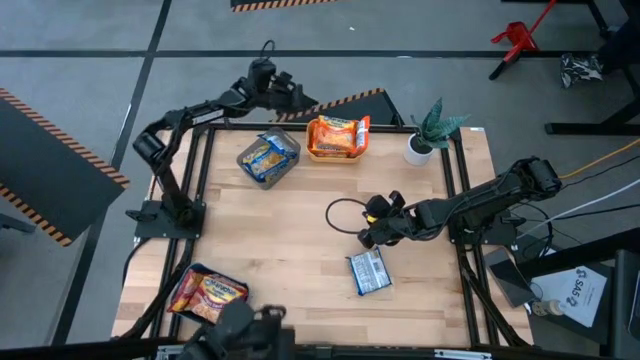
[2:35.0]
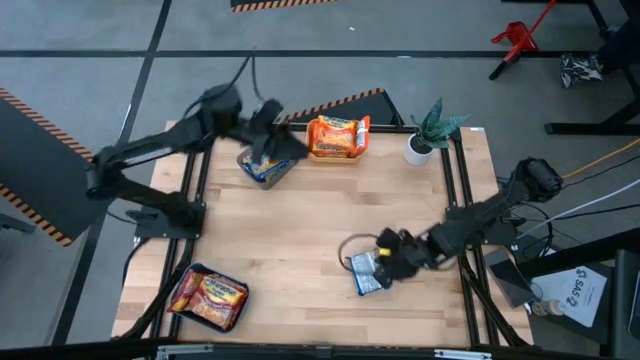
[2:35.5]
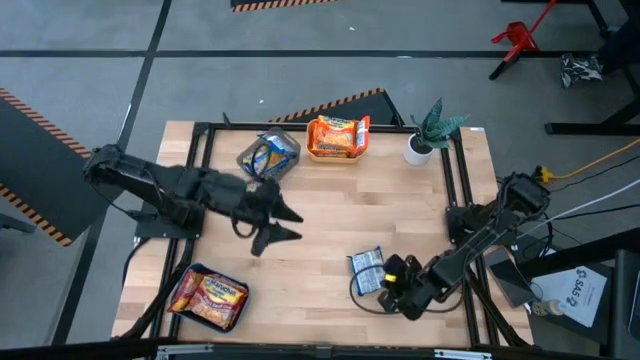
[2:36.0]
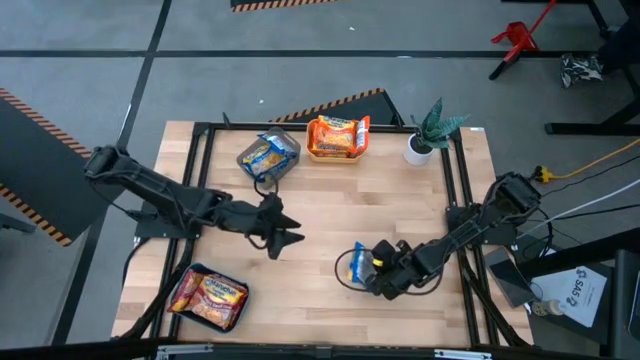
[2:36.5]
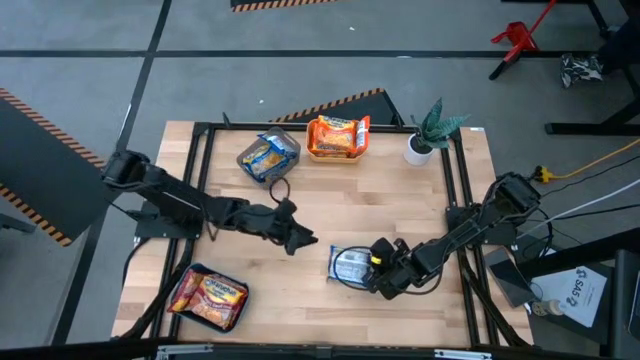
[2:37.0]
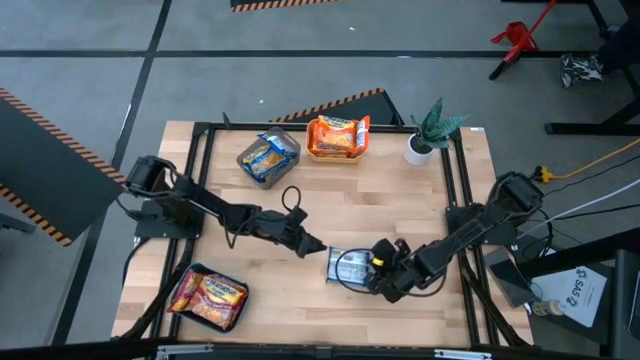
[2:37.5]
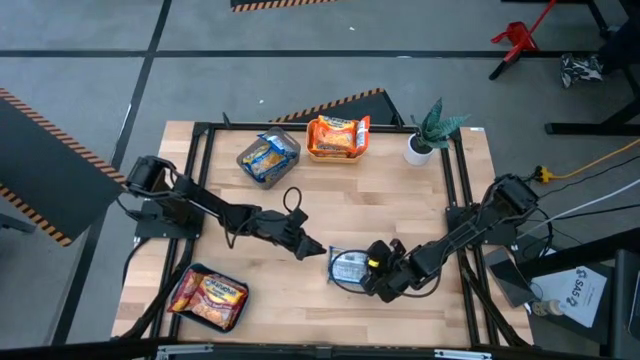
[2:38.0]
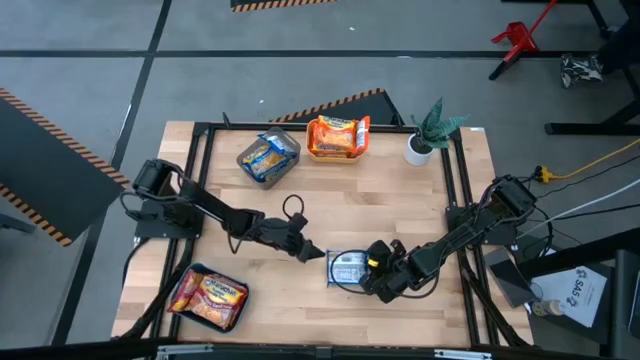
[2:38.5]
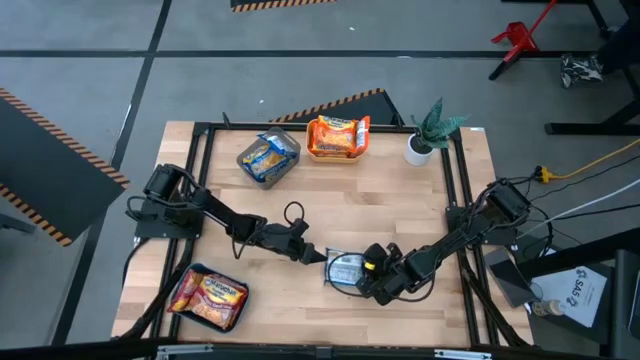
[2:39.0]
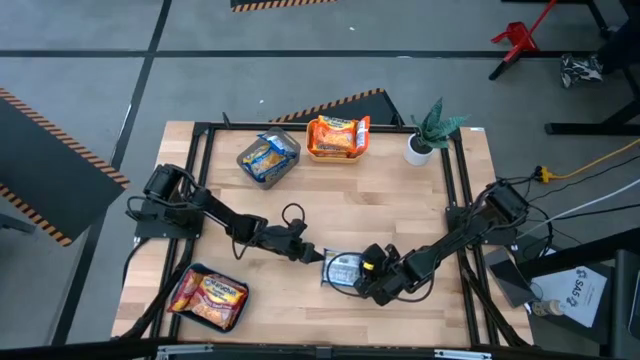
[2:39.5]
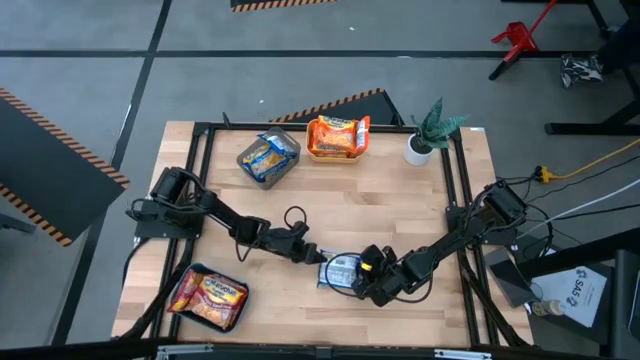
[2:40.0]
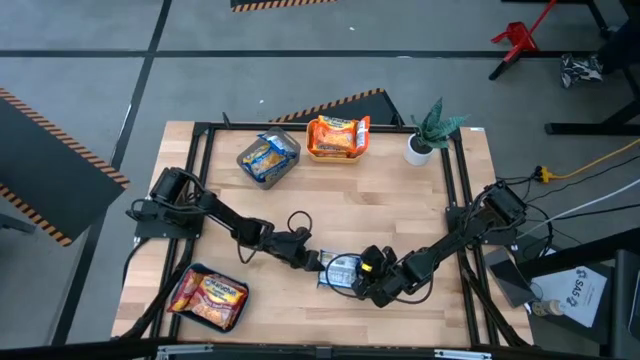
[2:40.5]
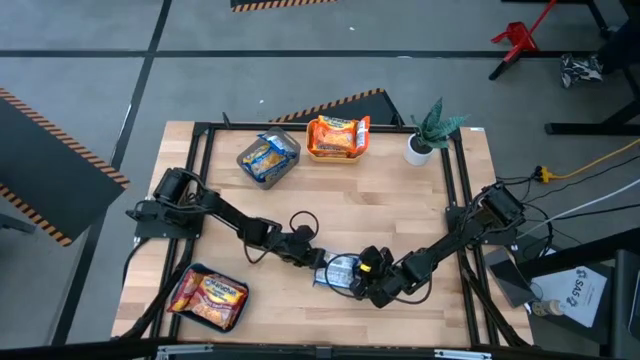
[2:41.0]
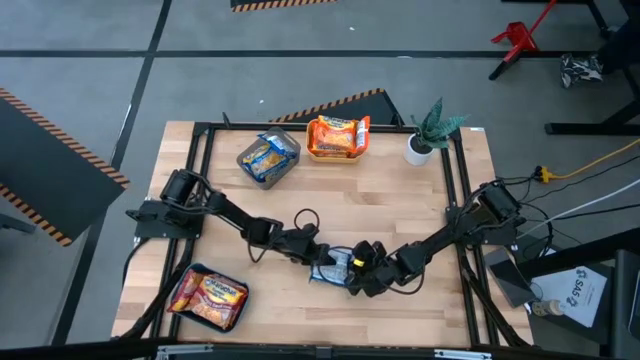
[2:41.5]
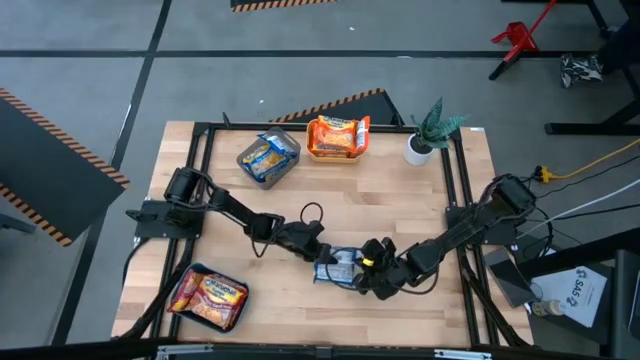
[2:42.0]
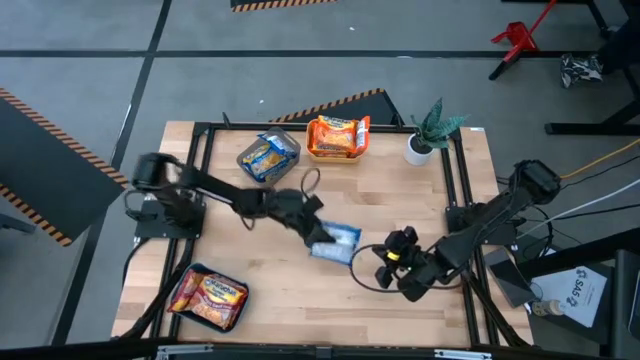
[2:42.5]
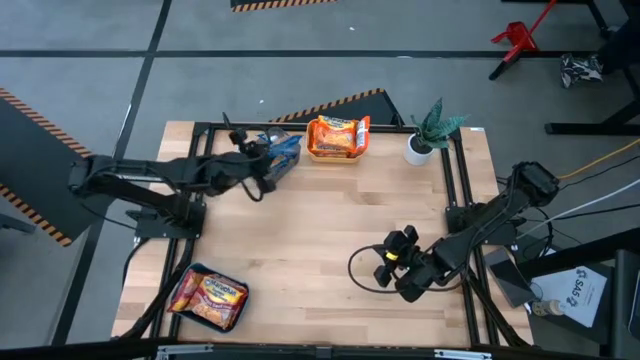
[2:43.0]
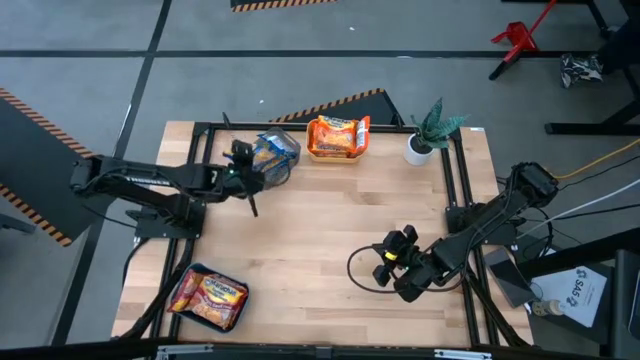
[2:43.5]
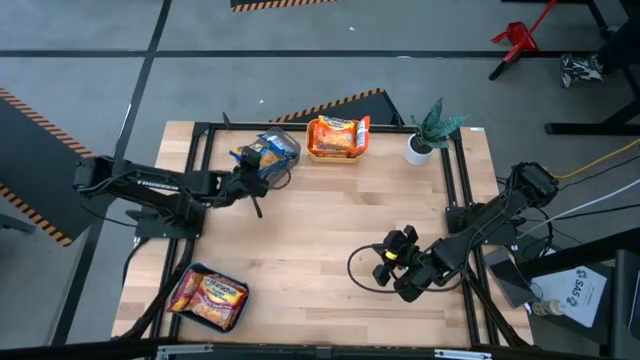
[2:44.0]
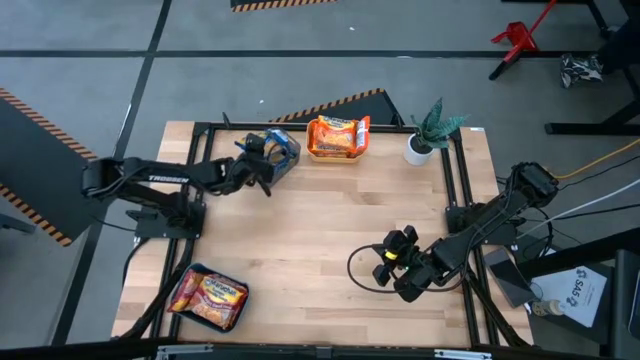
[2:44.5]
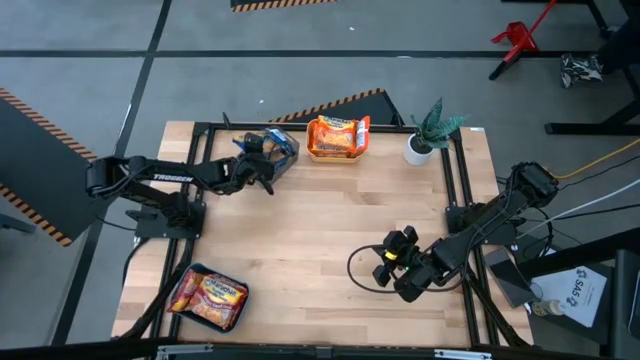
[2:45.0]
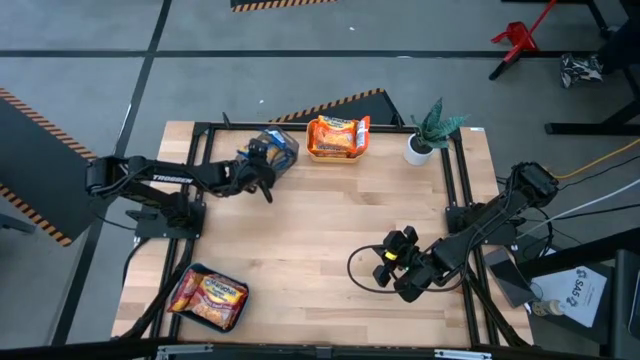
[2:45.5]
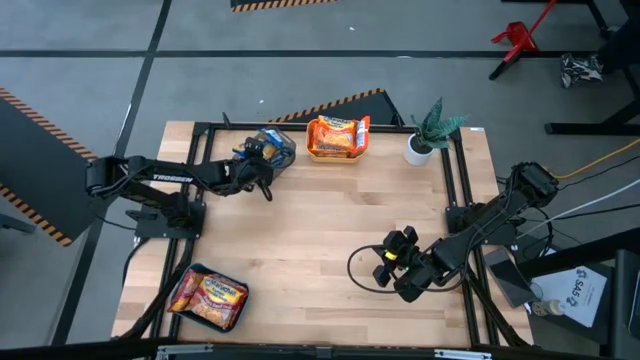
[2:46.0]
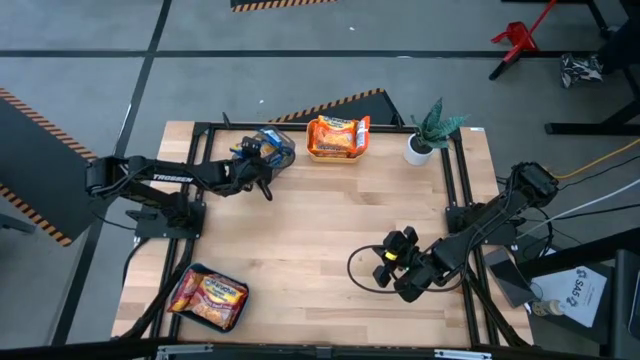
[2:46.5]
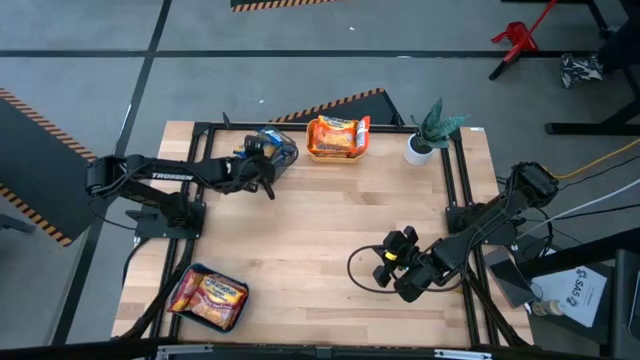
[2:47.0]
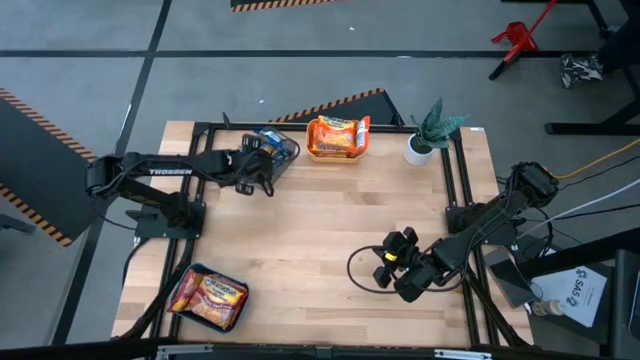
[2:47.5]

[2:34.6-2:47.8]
Task: Sort Maruchan noodles
Put the pack of blue ramen noodle soup into the transparent black bin

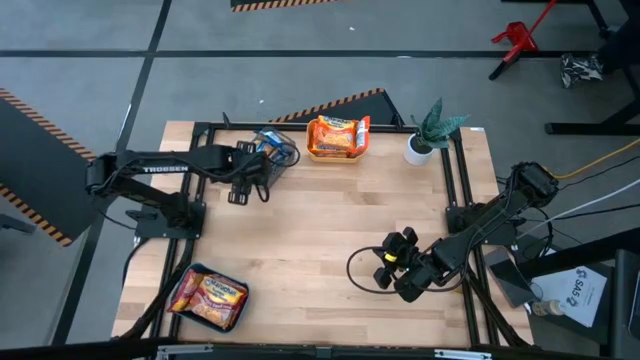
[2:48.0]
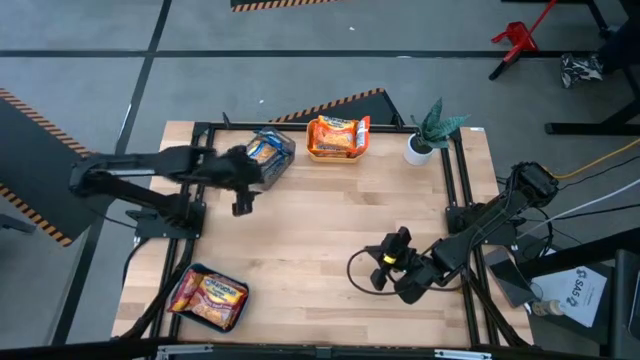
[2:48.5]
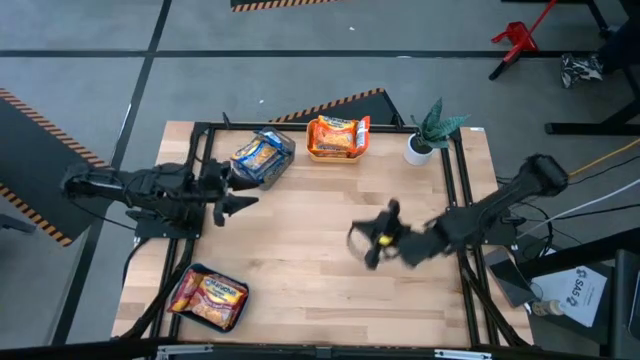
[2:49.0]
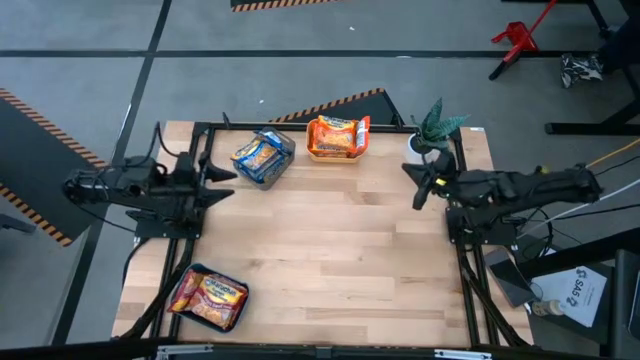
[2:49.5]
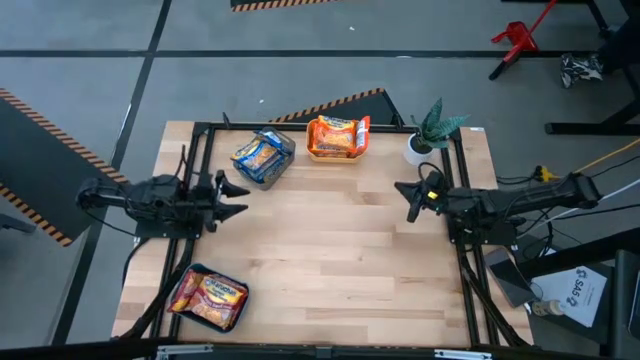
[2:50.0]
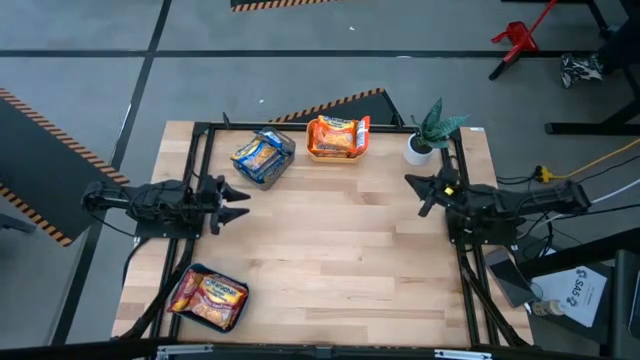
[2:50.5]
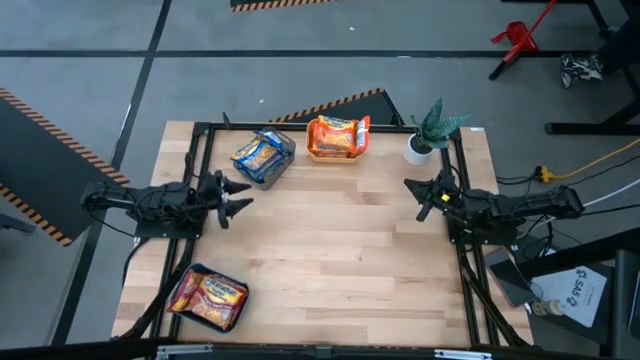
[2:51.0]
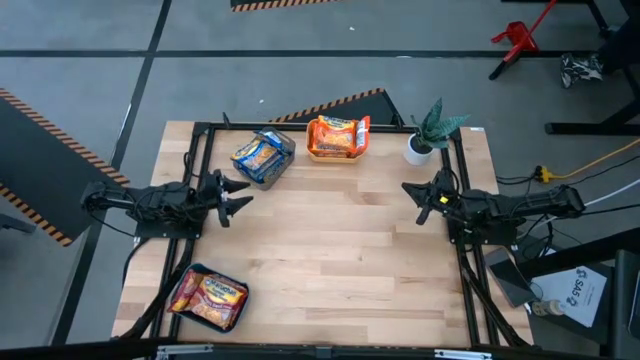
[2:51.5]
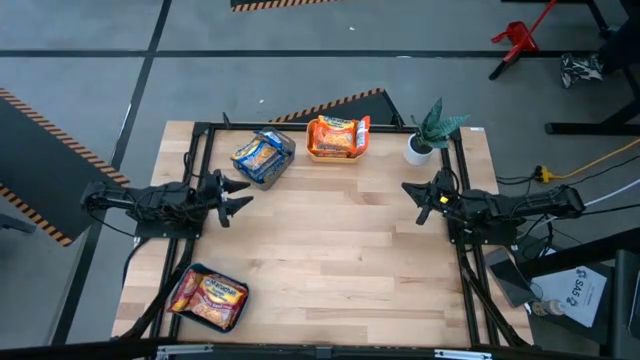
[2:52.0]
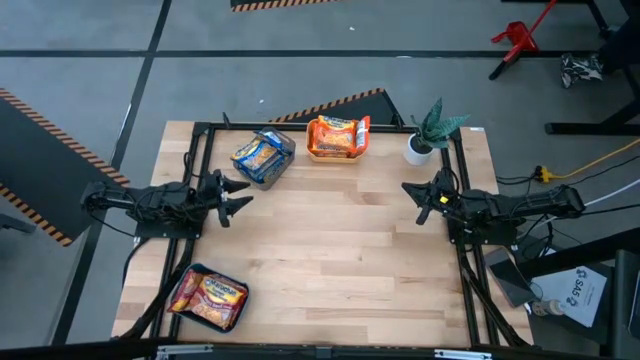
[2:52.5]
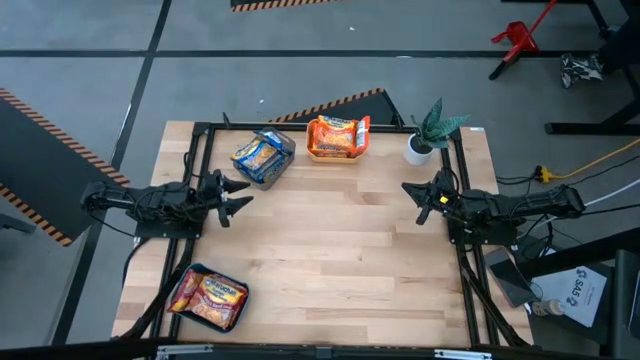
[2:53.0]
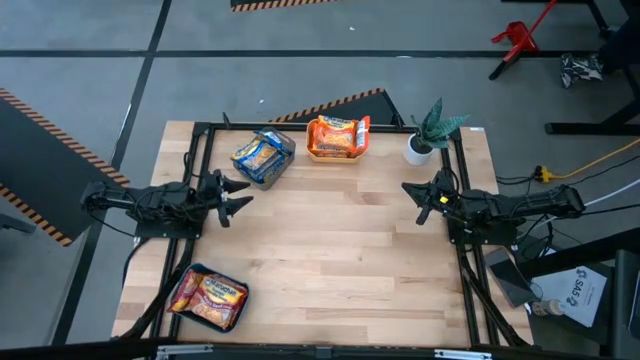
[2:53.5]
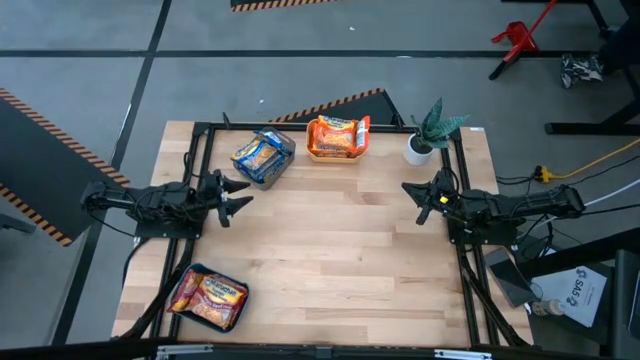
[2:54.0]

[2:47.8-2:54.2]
Return to home position

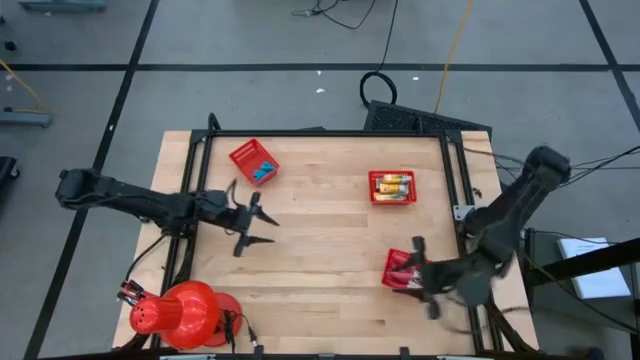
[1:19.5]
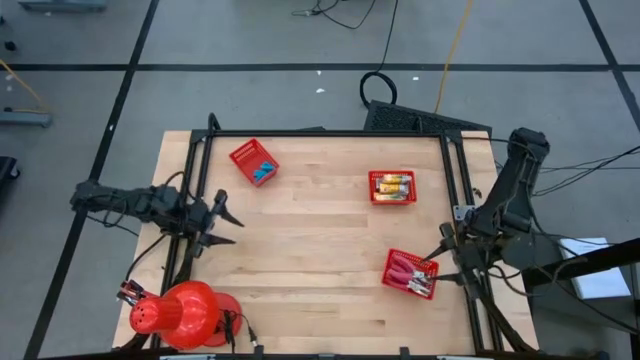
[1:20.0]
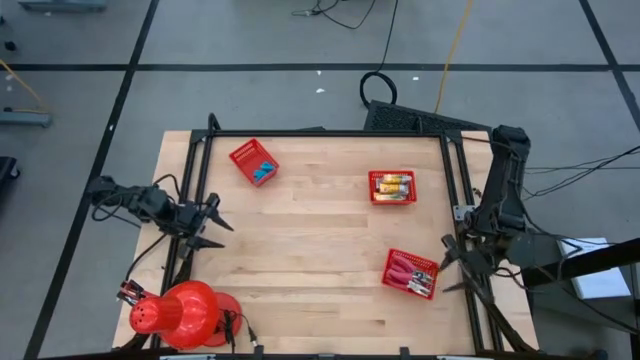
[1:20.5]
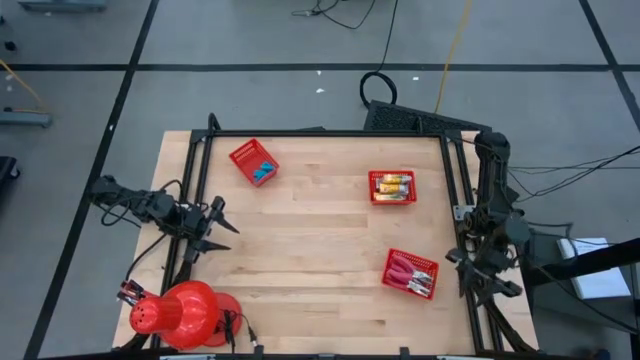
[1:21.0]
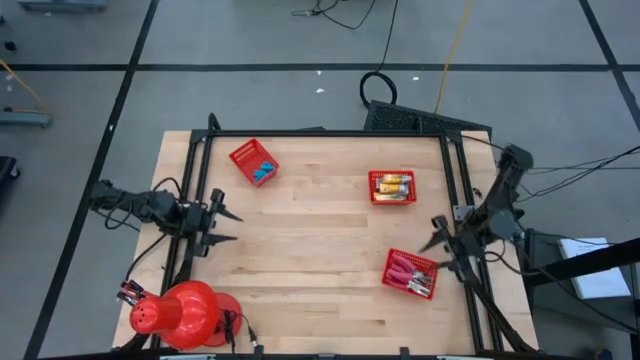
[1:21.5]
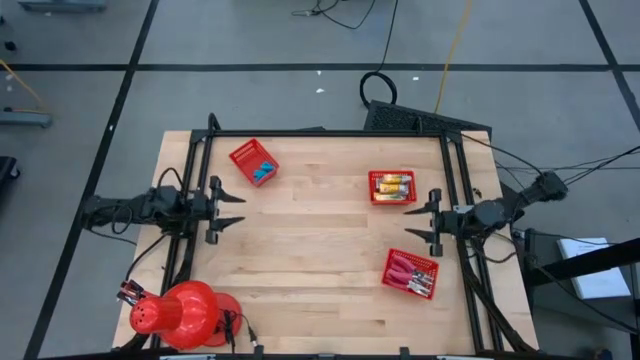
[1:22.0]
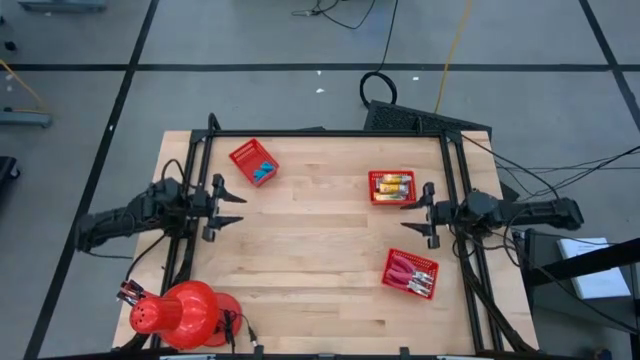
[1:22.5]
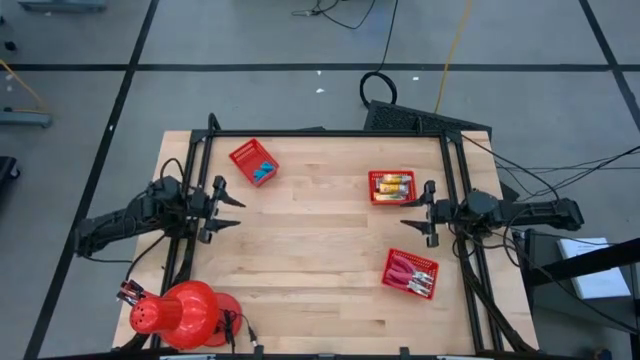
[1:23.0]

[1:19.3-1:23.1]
Task: Pick & Place School Supplies
Return to Home Position
